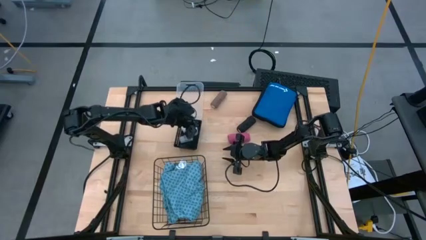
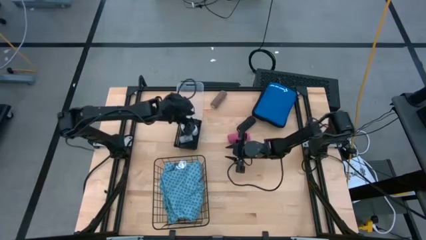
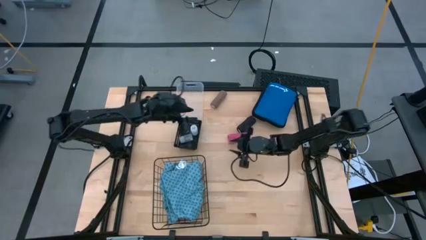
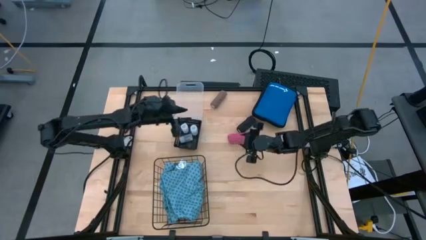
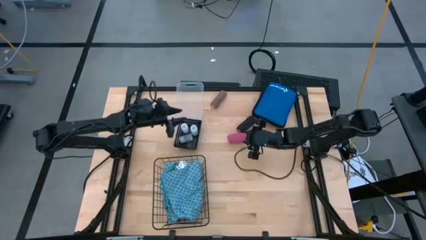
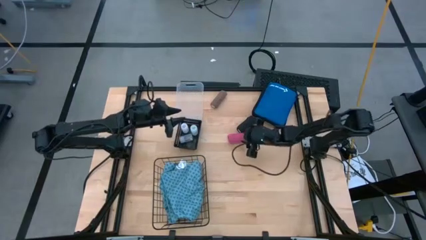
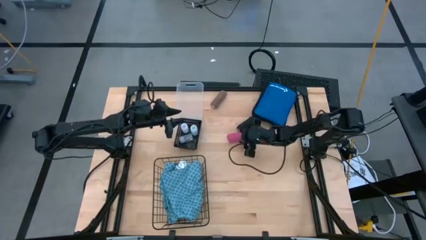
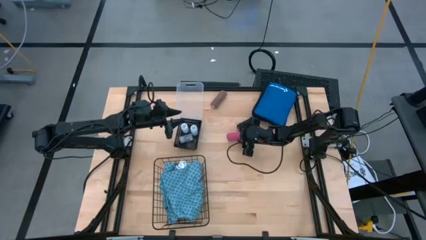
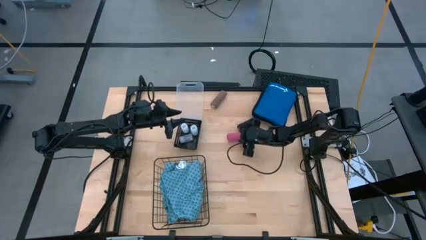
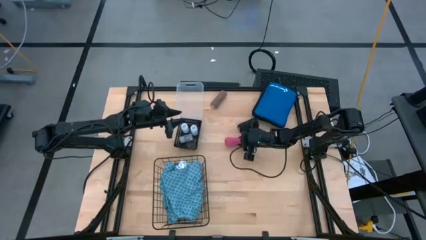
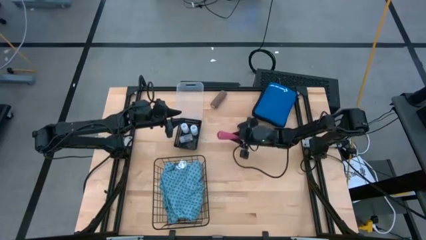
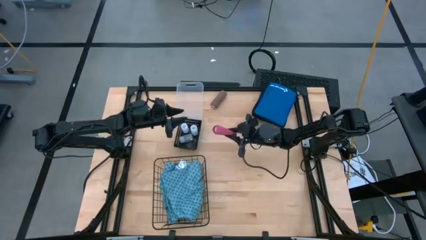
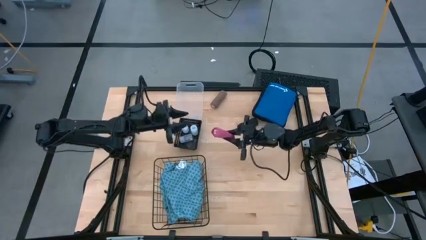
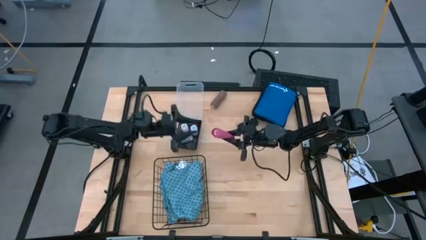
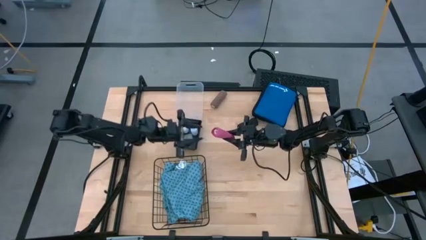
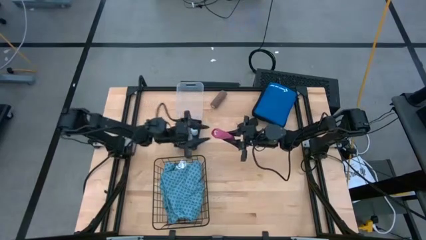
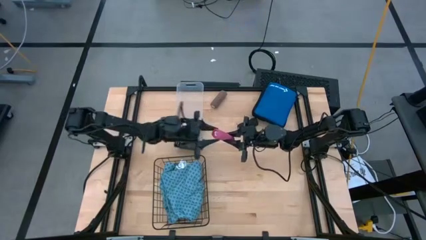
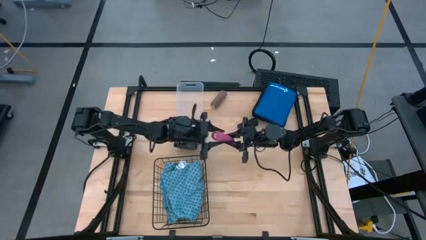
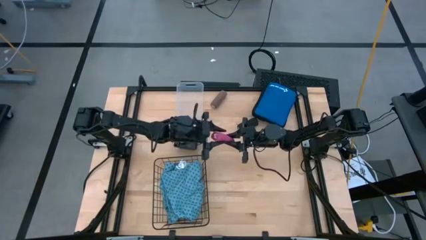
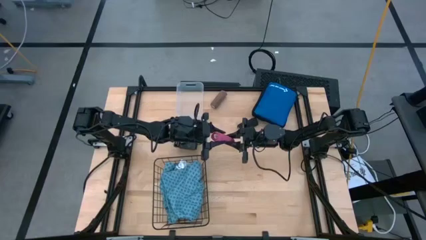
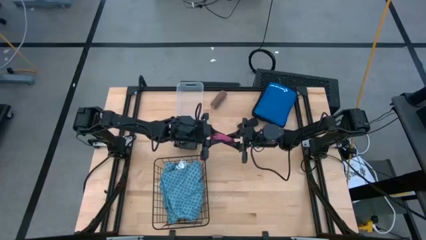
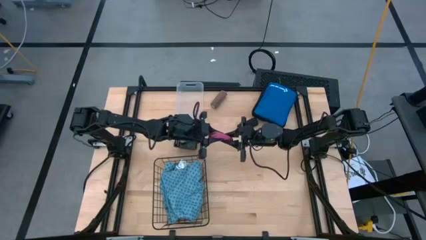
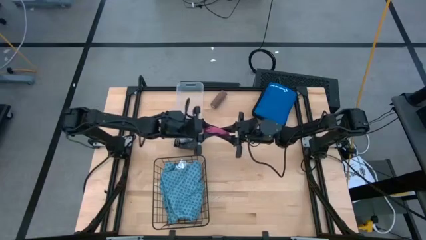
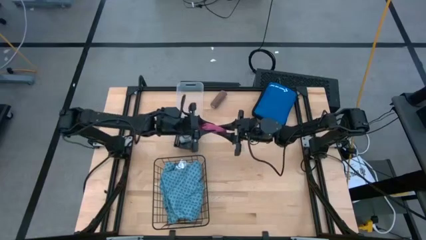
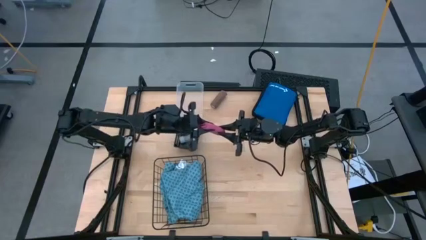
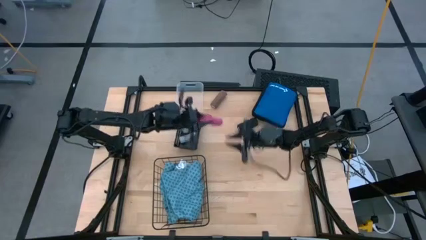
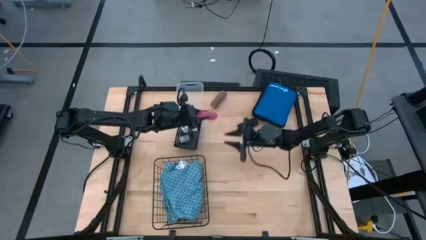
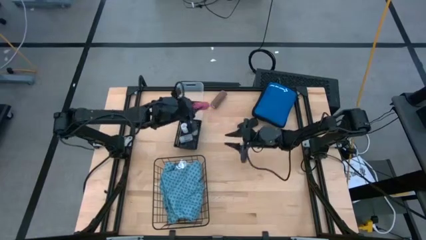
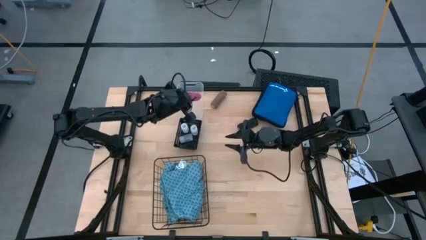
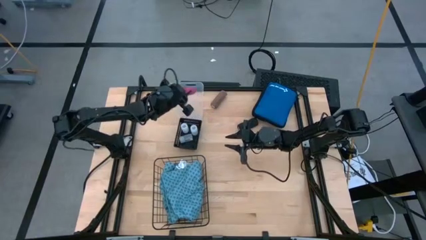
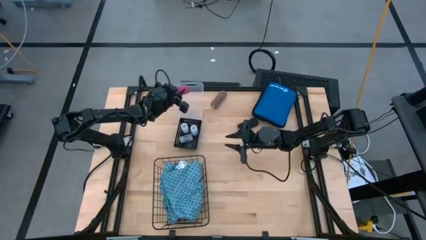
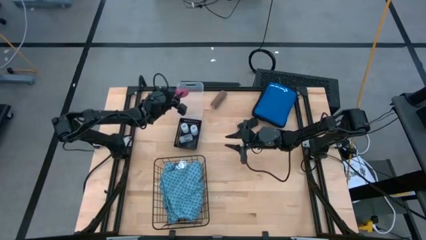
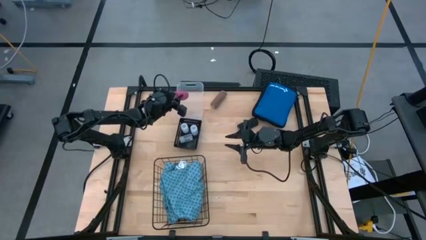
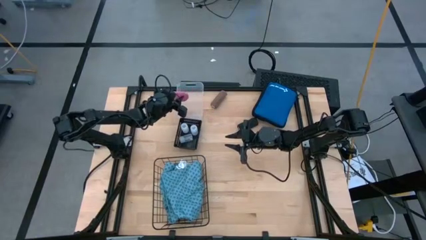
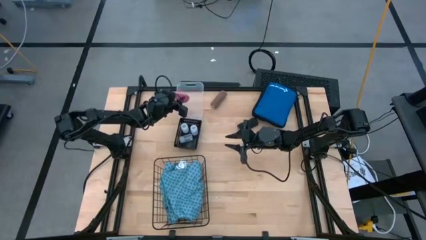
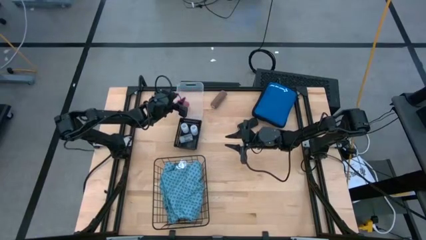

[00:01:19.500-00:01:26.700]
Task: Pick & place medical supplies in basket/bin
Put the pink bandage into the transparent bin

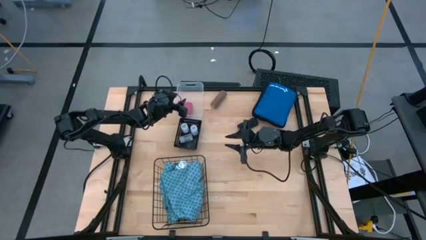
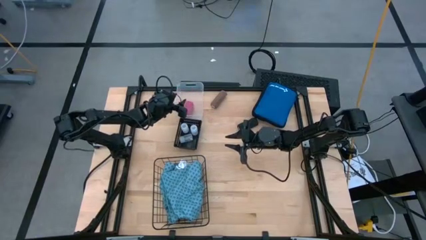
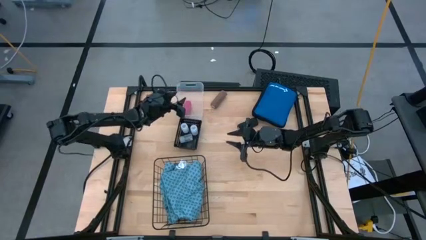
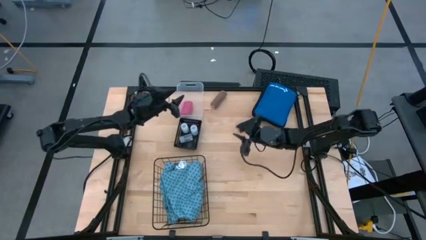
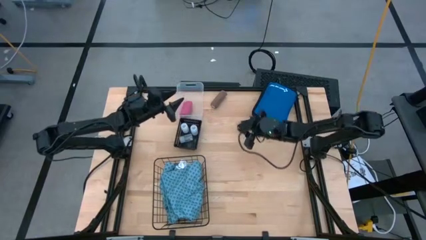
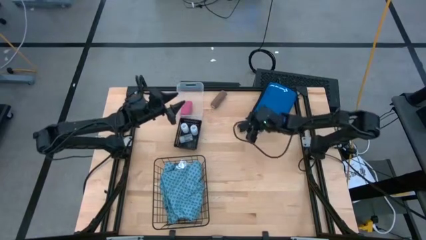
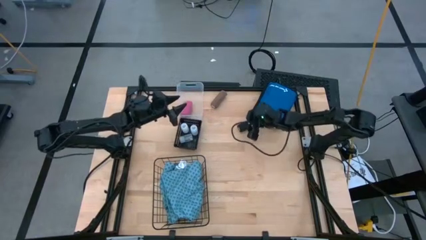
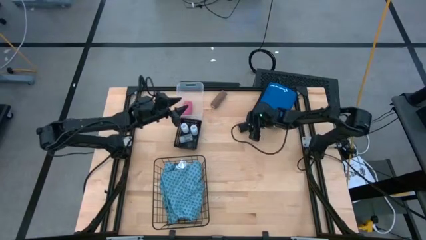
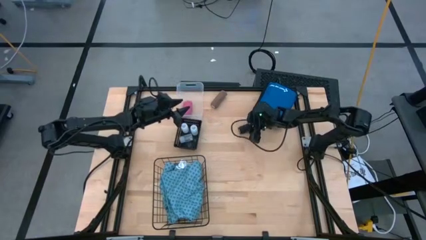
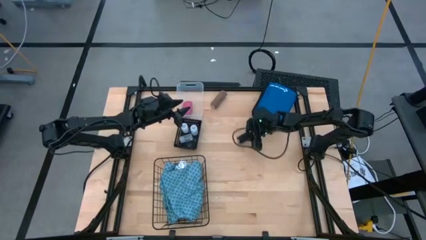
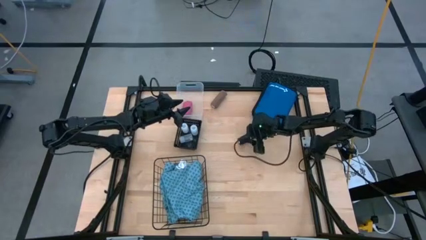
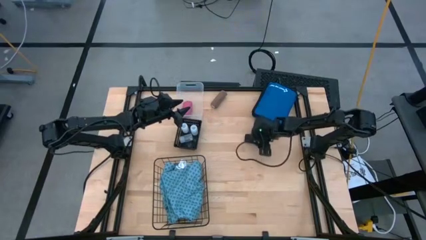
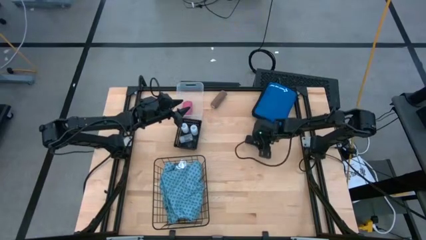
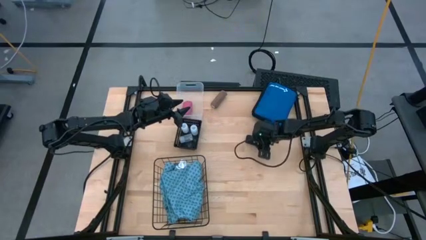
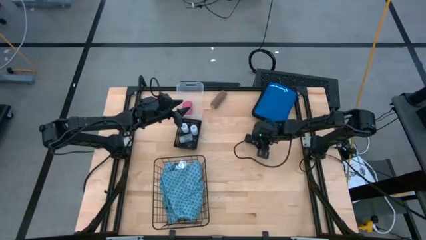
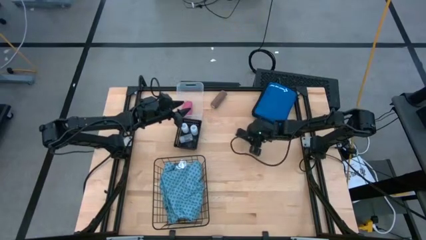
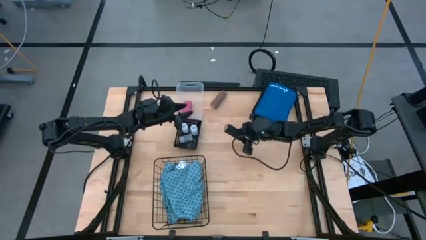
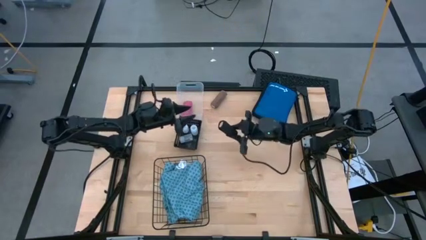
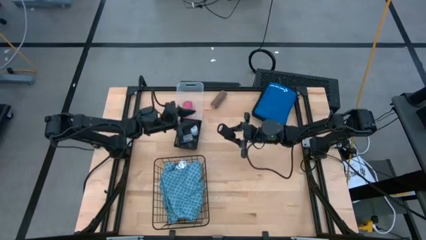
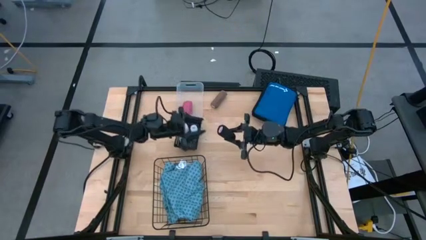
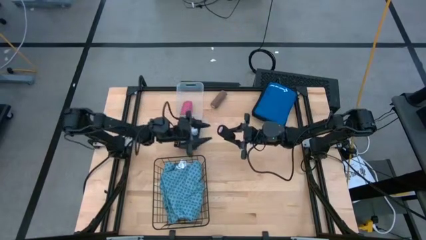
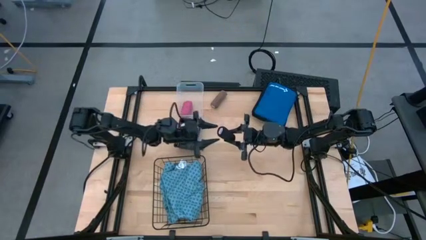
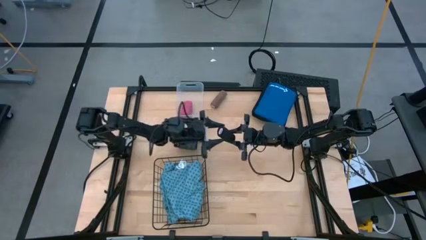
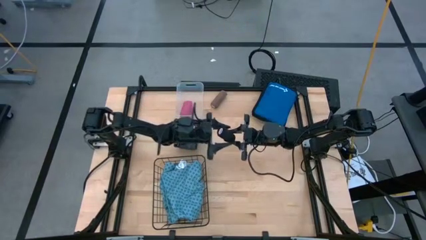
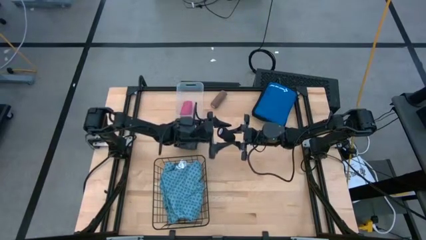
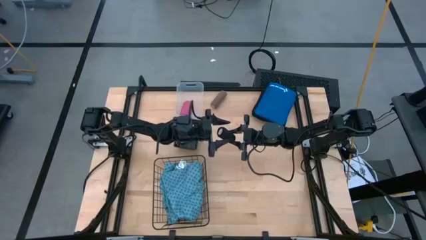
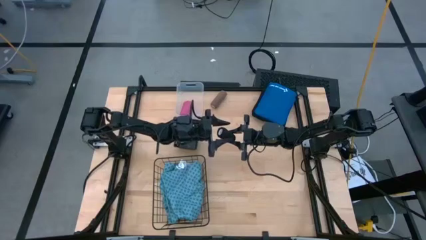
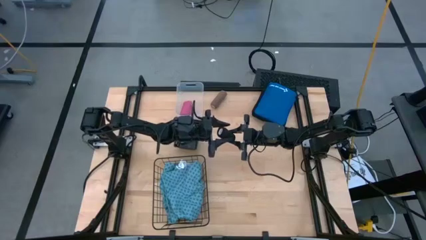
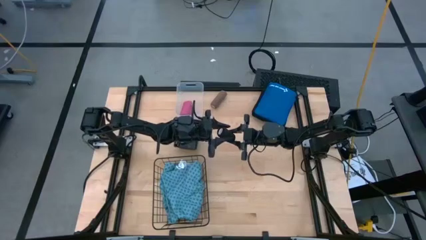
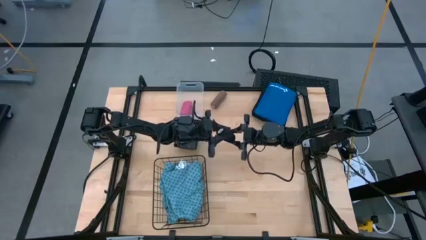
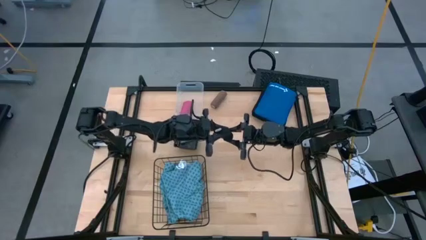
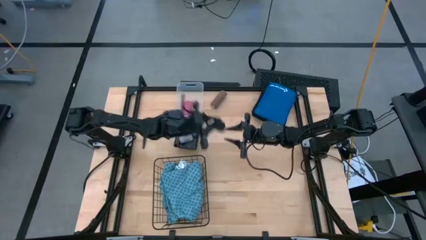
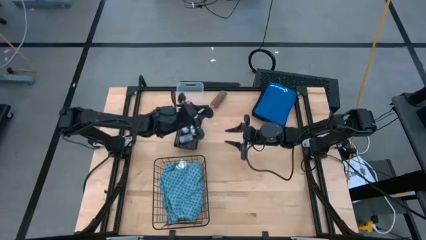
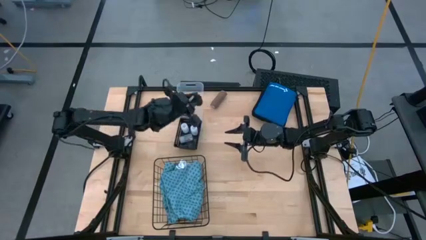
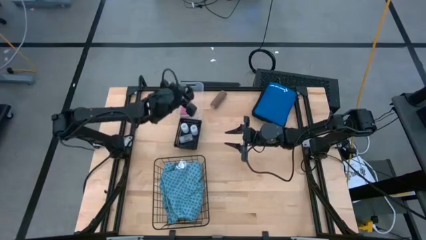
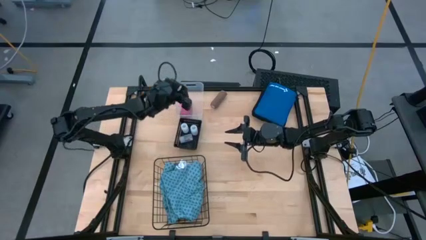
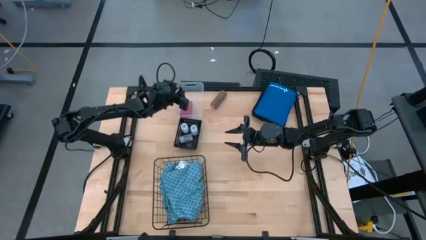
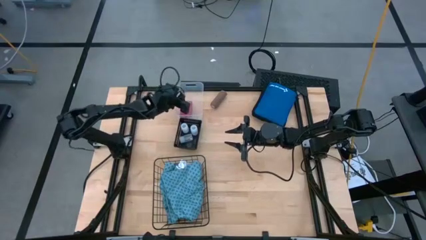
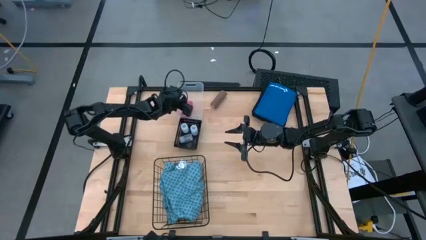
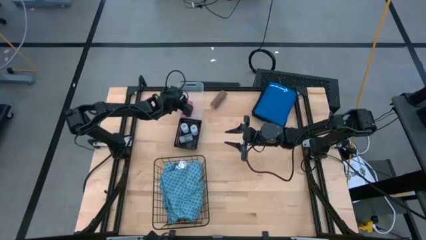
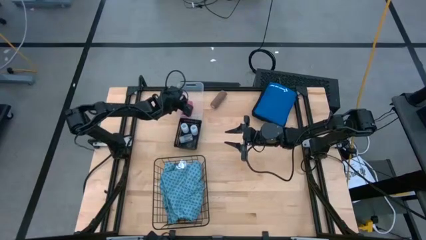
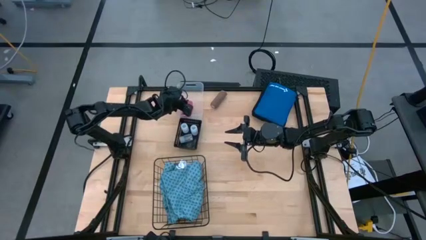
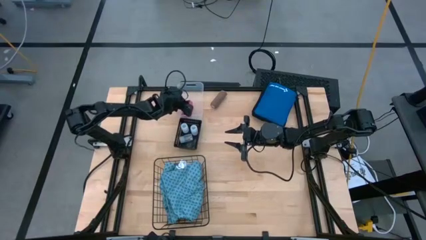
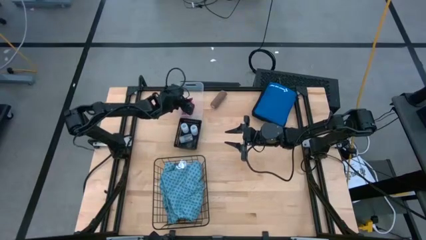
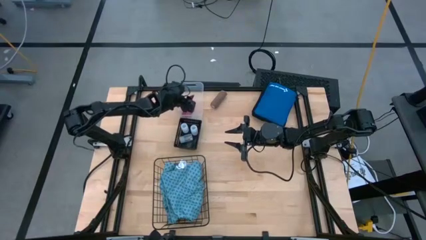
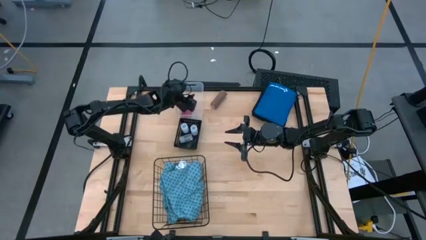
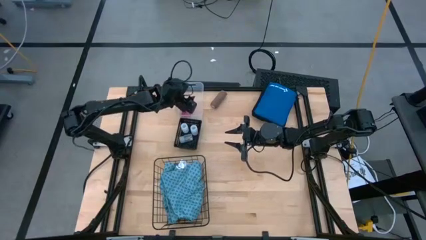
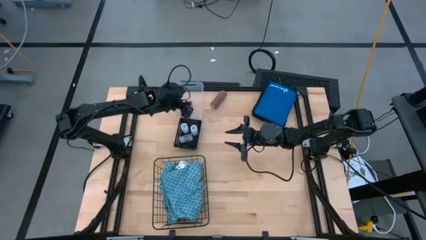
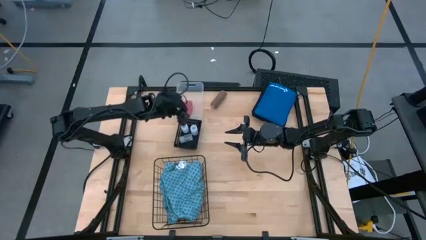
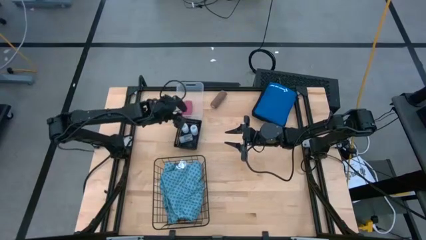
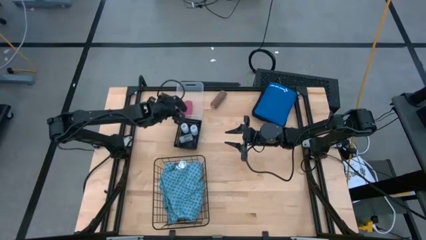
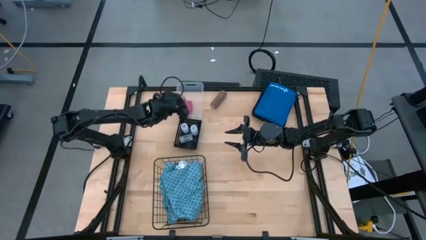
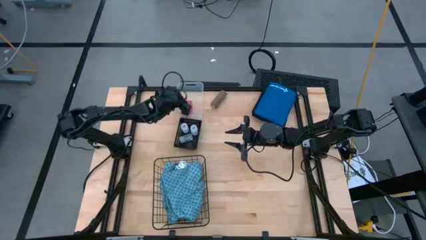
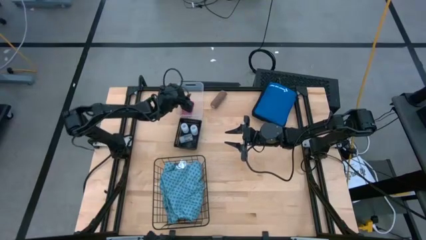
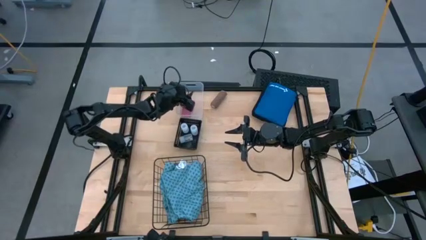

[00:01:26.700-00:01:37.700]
Put the black bandage into the transparent bin
